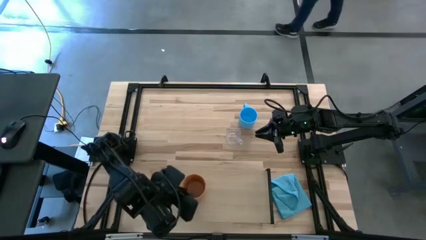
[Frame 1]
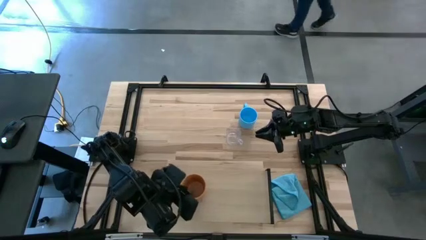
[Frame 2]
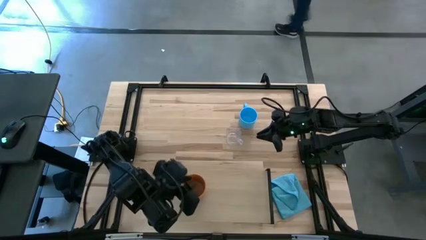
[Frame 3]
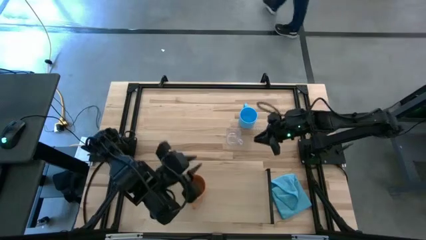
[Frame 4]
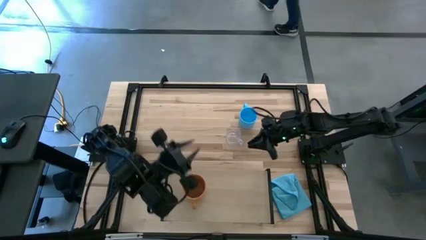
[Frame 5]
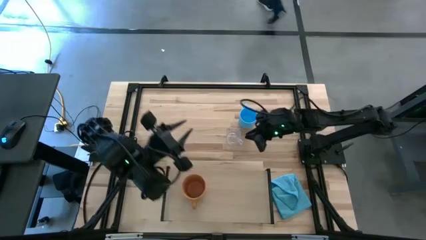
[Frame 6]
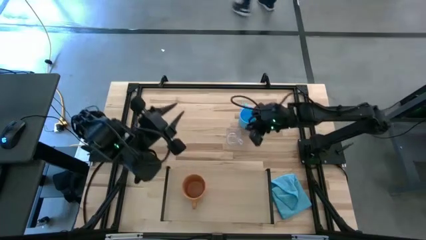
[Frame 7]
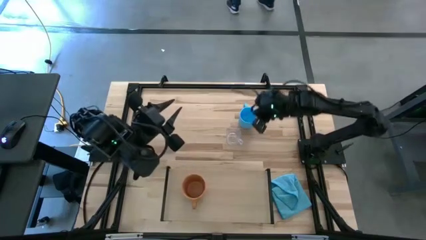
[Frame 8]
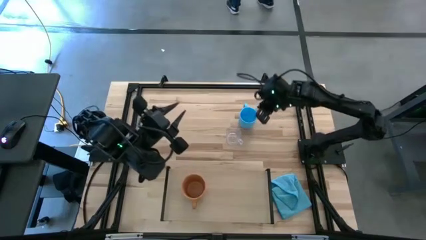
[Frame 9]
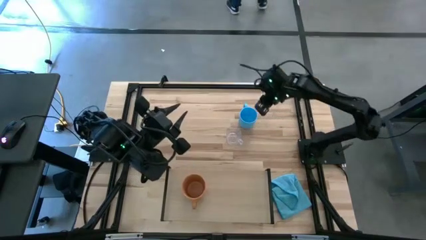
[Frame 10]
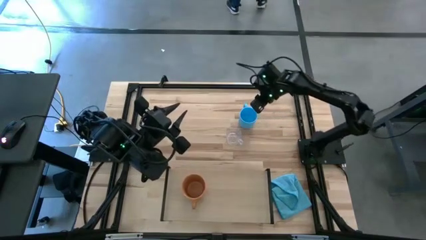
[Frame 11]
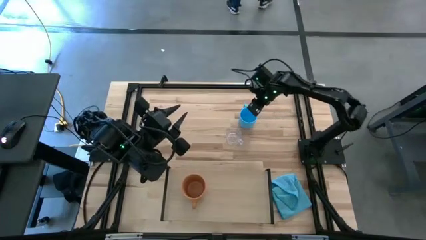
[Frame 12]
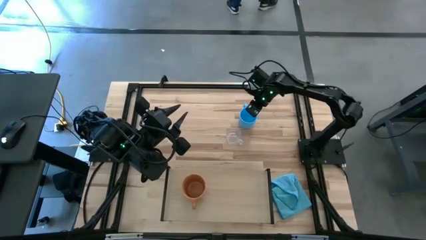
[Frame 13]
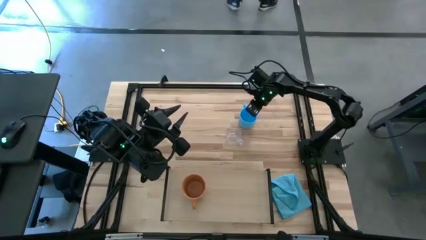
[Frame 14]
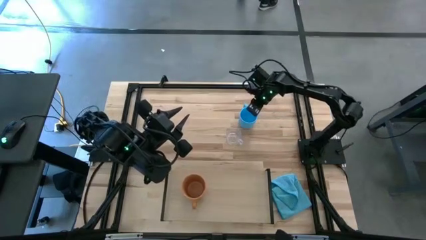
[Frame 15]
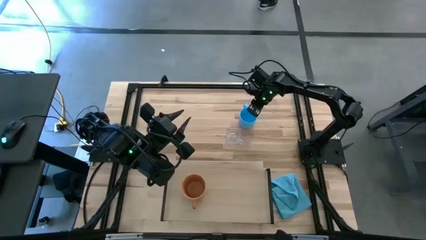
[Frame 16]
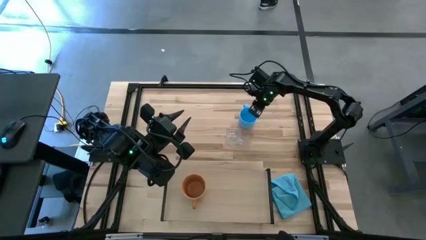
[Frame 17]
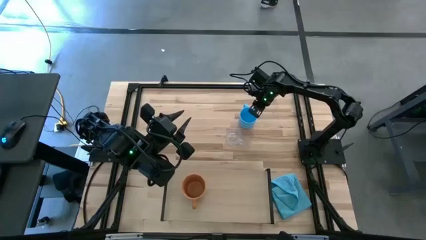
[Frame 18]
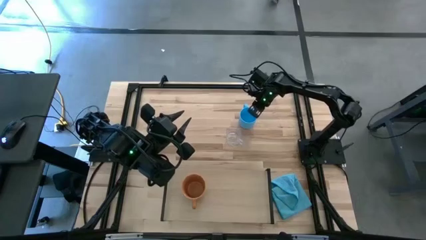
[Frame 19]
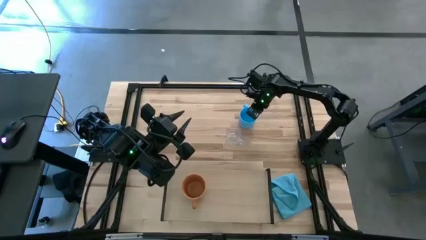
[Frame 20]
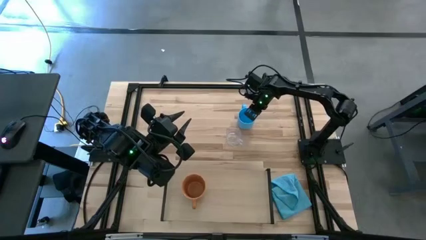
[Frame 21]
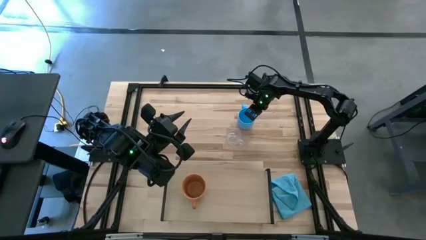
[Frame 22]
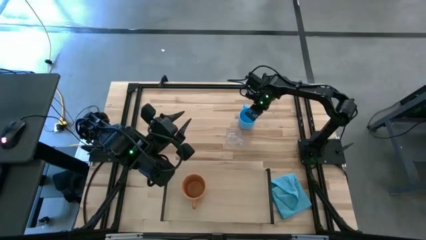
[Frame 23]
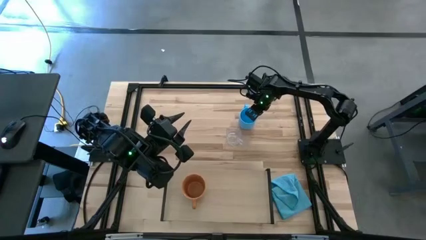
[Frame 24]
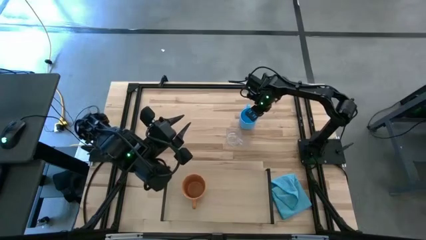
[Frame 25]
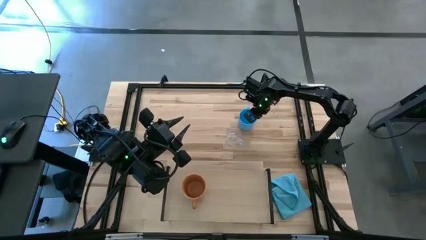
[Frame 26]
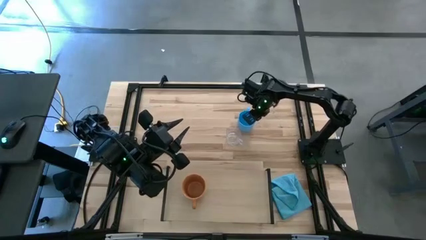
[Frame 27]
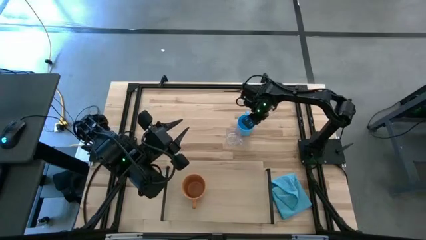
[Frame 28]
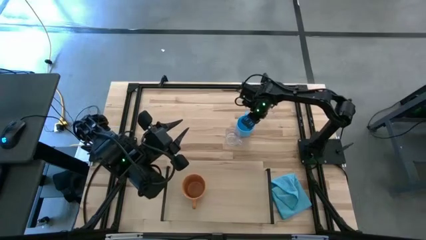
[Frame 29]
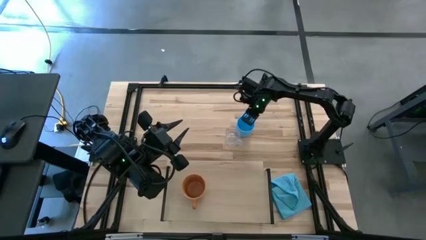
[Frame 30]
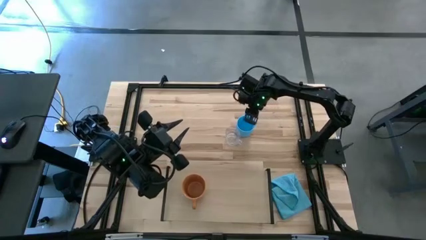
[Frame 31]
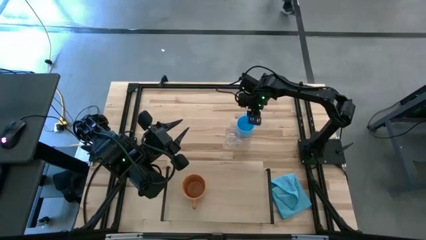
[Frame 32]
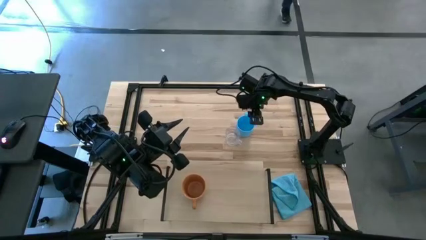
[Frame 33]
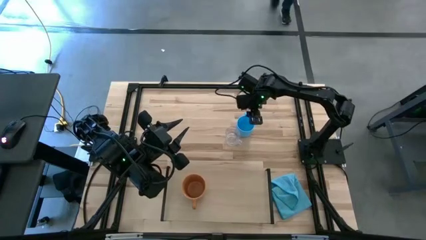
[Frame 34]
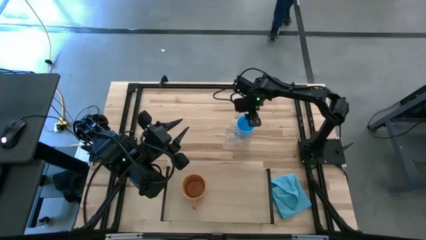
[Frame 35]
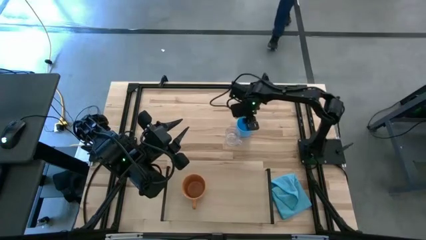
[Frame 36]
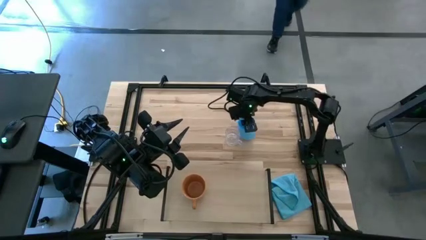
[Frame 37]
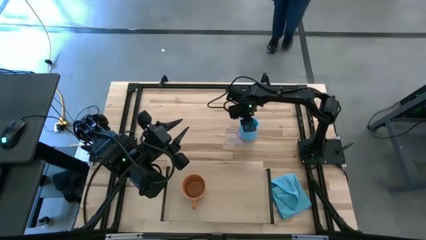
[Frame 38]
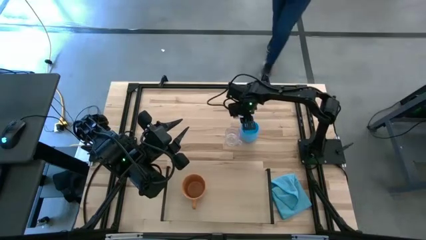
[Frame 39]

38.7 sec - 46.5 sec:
Task: Stack small to large cups/mugs on shelf
Put the blue mug on the shelf

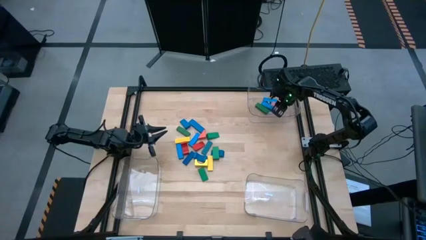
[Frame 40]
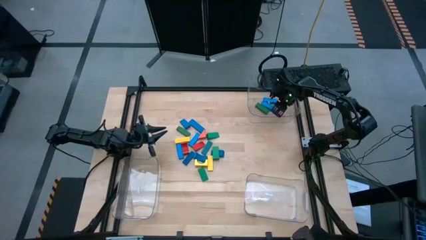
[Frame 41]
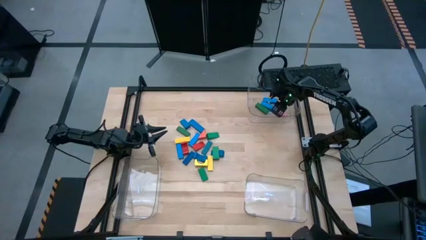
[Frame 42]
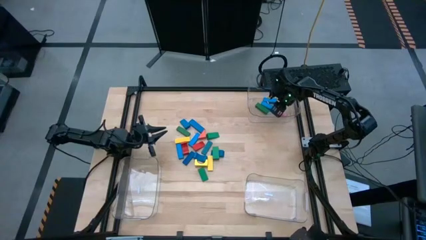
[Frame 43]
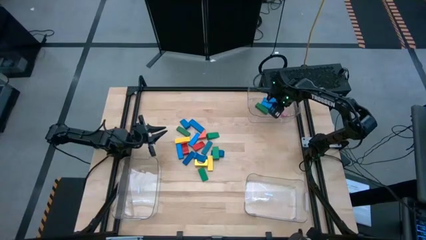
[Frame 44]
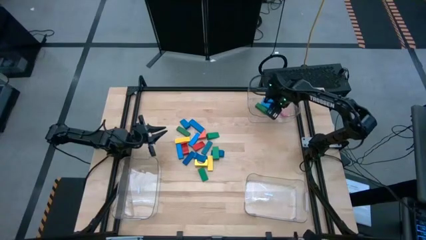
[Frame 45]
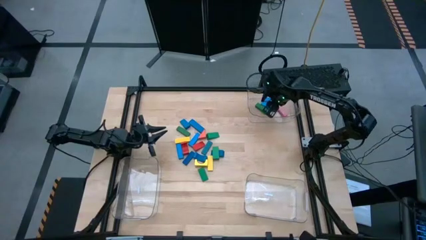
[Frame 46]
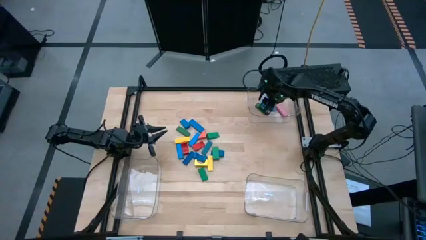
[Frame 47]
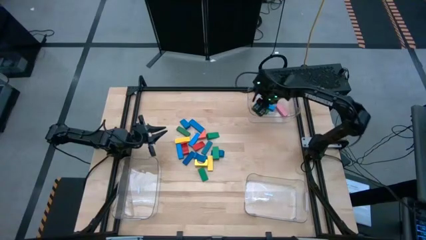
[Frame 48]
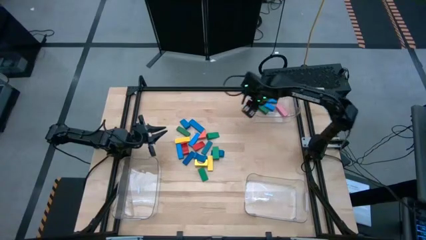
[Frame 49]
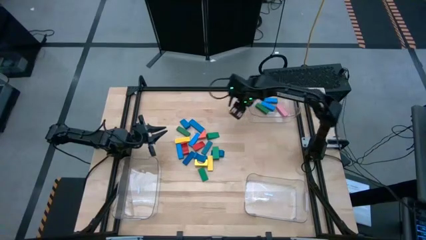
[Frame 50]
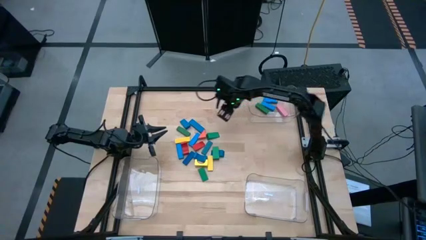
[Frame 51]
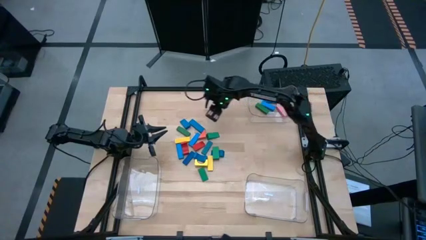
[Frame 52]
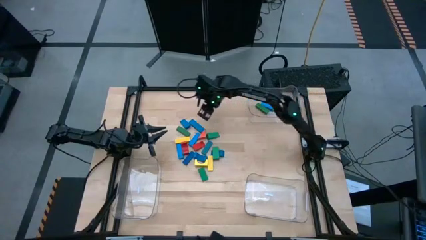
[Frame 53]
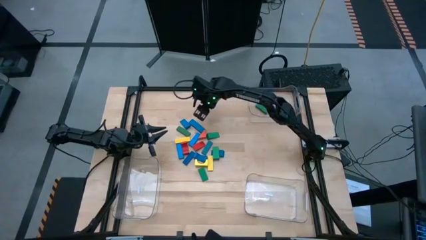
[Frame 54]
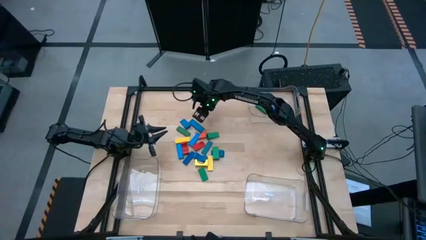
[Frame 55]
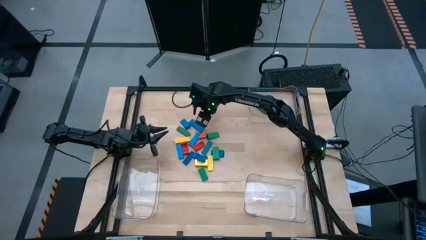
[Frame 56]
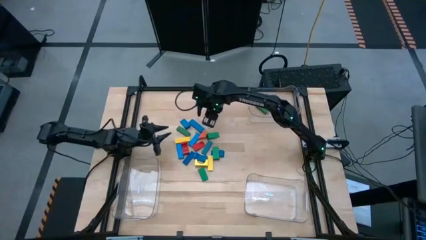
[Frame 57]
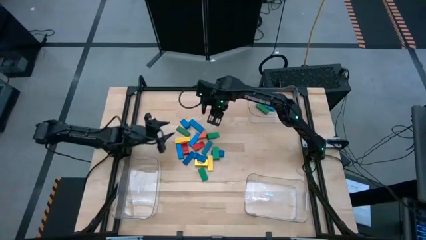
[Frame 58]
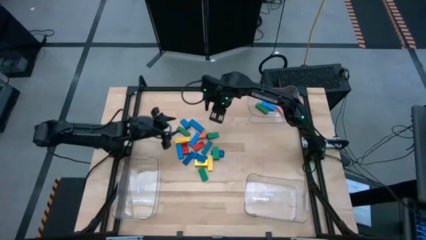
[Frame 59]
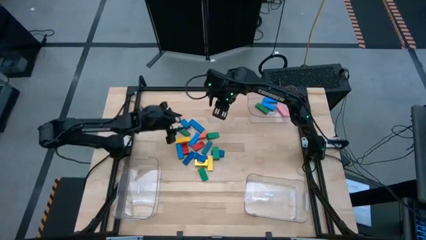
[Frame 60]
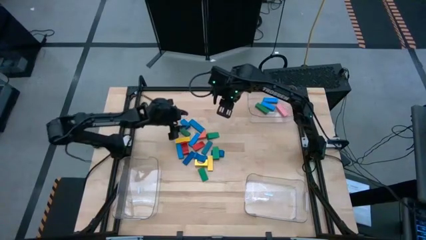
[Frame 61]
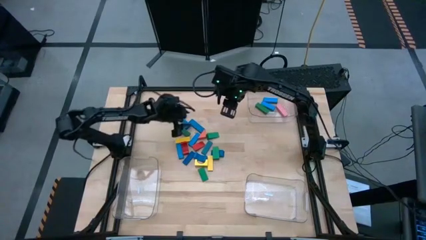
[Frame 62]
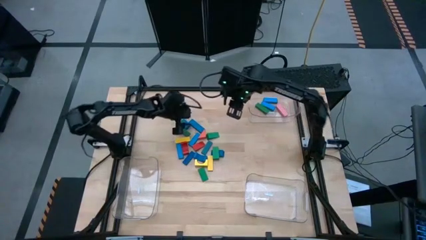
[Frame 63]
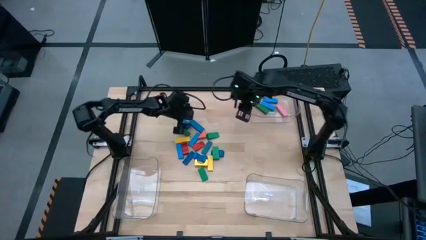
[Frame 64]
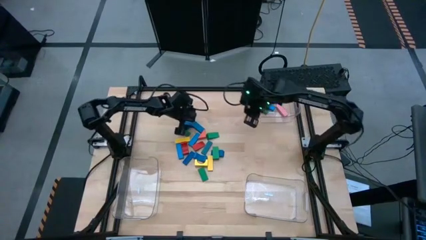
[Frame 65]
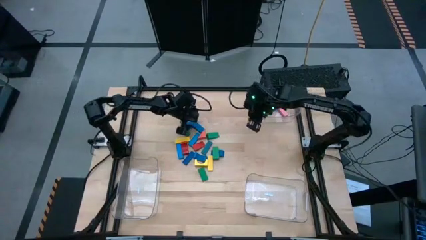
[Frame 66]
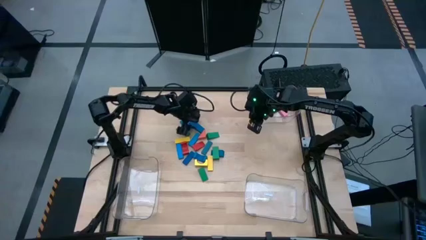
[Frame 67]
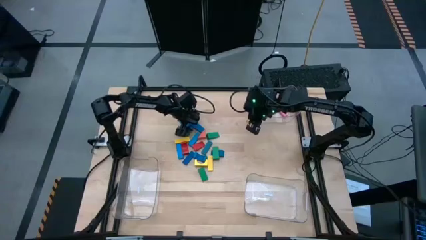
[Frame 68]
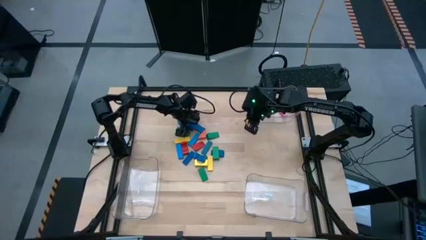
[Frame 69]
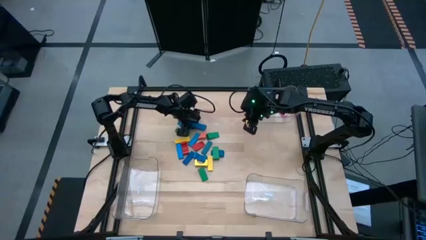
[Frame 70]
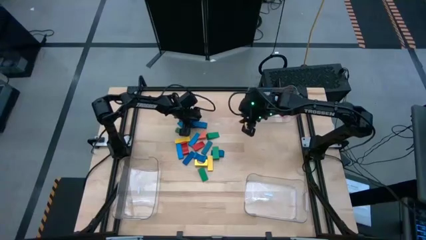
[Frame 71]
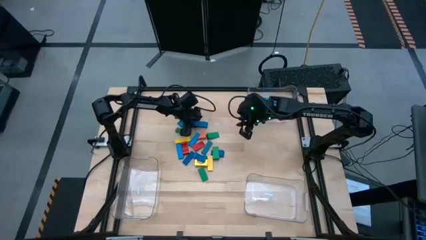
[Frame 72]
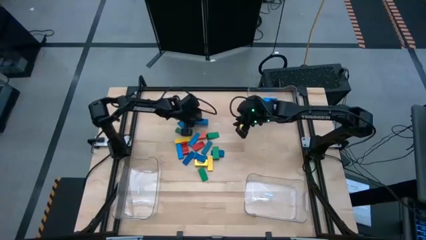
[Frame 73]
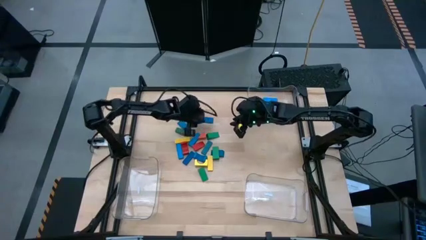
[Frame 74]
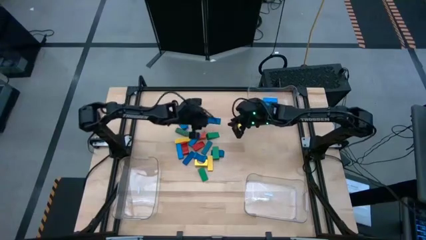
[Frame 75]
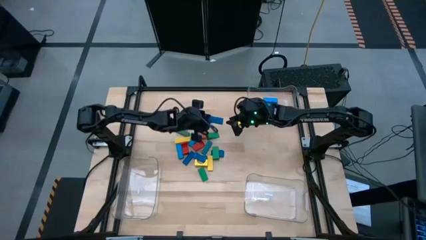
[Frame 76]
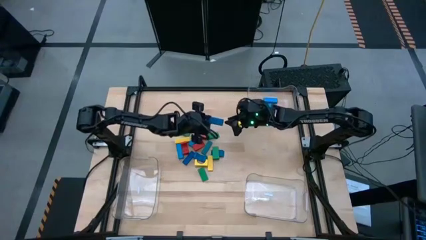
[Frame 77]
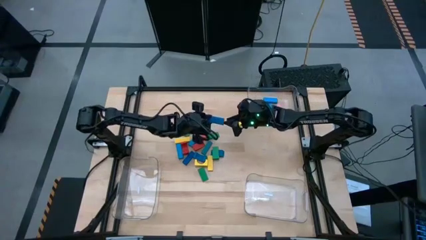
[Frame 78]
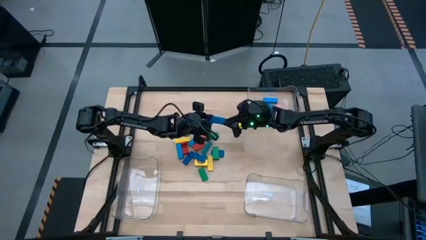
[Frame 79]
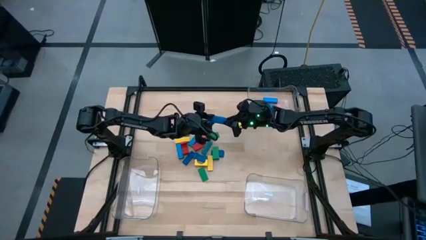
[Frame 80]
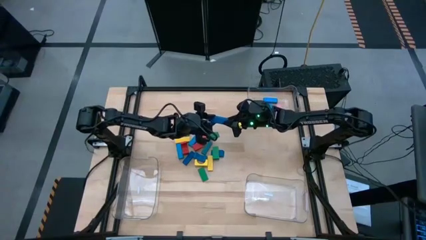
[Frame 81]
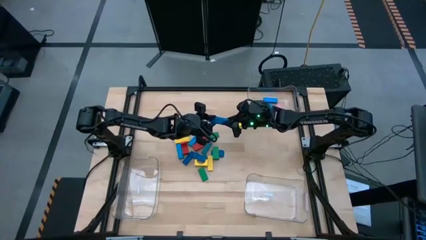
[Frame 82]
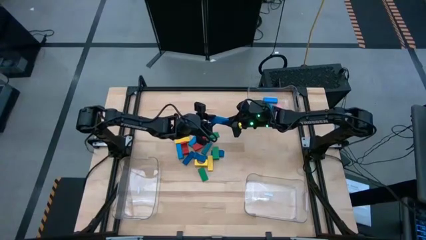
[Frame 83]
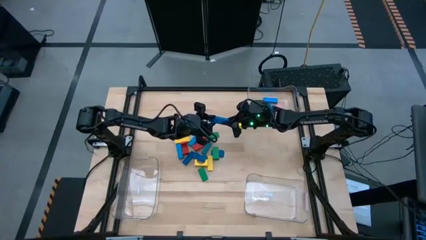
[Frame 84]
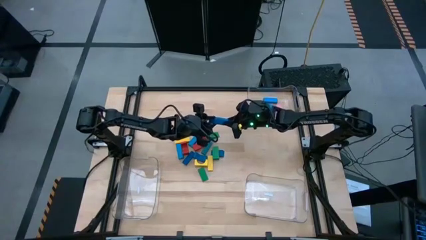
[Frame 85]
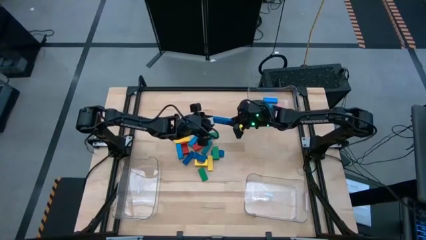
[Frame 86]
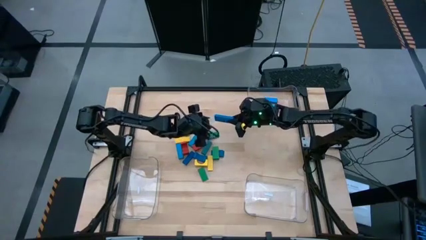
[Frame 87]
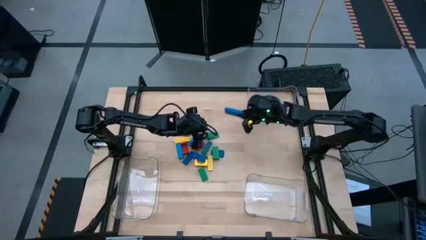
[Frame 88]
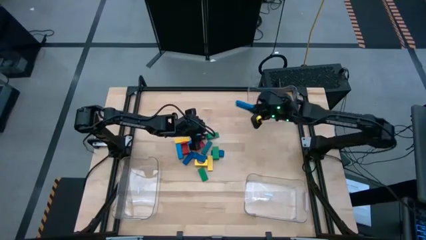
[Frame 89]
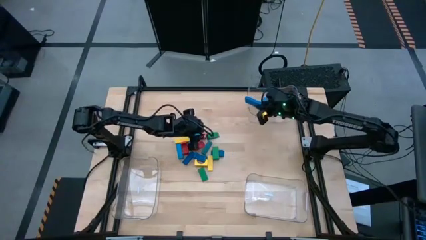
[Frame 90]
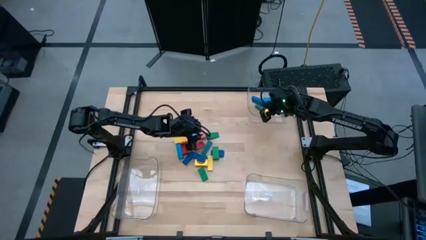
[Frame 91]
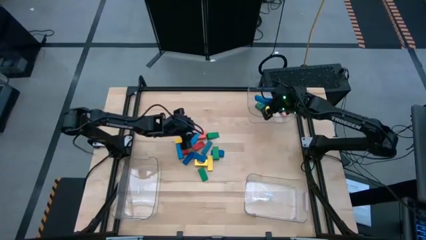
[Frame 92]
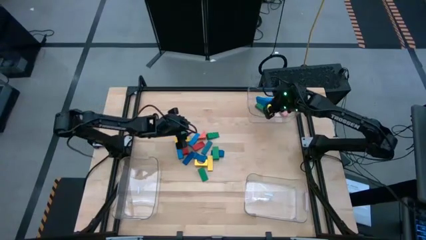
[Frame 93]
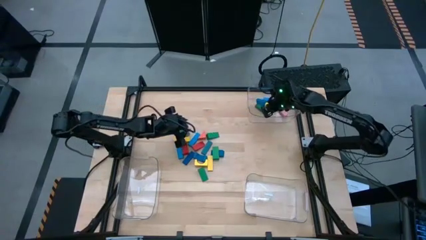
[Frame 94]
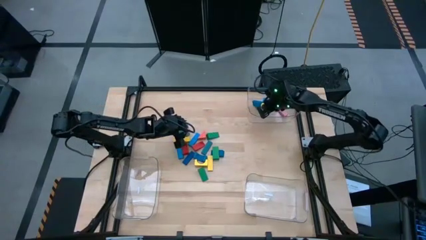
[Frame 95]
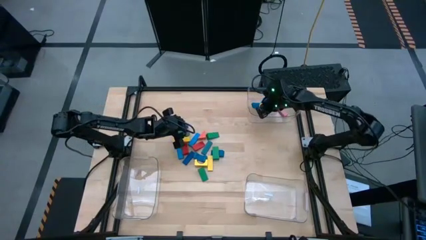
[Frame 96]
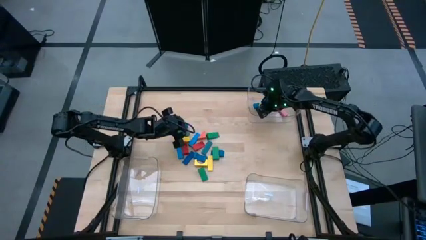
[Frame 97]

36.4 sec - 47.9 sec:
Task: Sort blocks by size
Put the blue rectangle block into the top transparent bin
